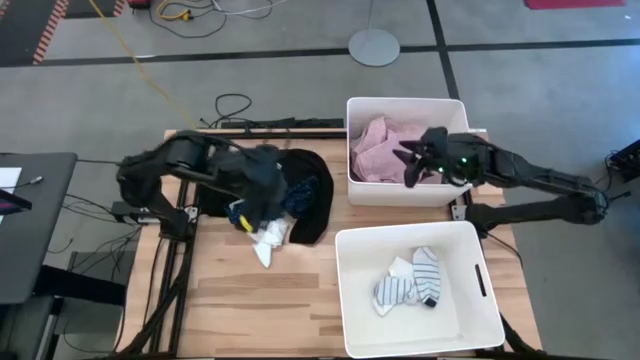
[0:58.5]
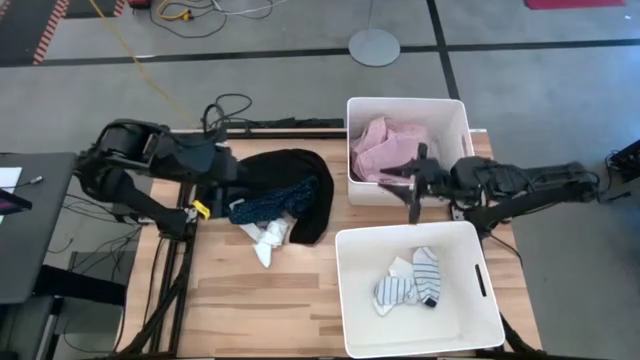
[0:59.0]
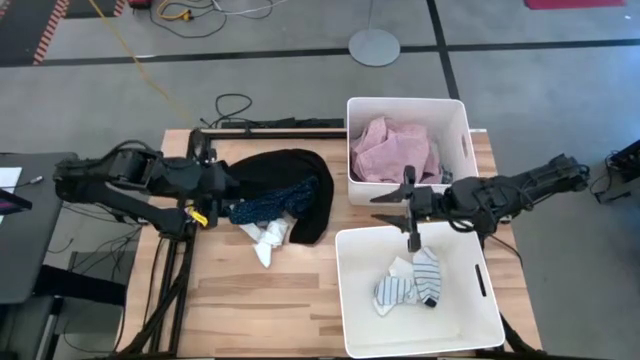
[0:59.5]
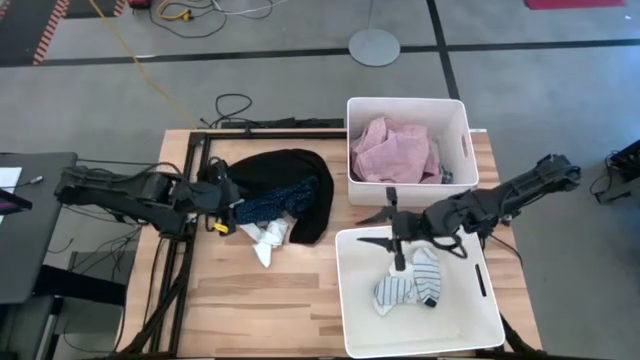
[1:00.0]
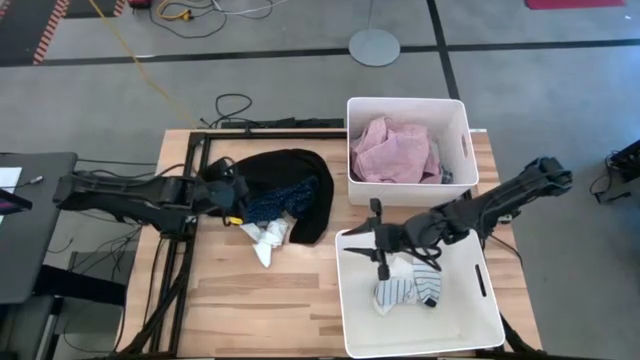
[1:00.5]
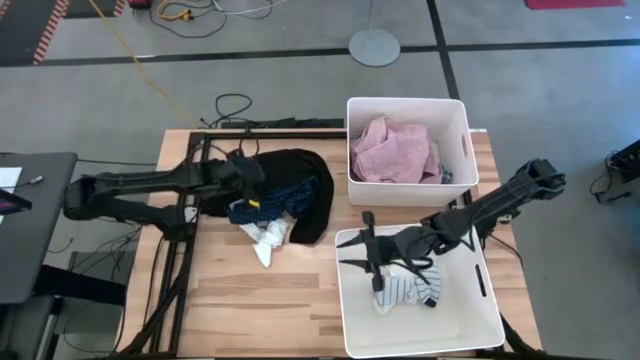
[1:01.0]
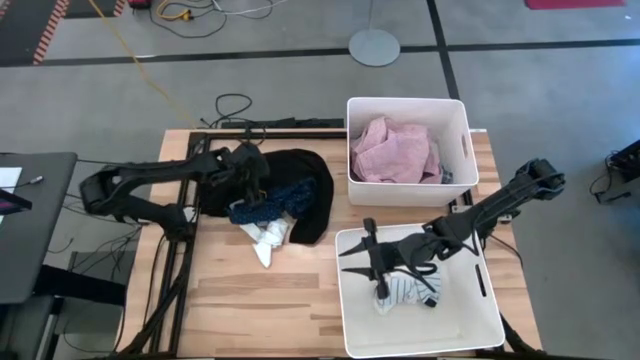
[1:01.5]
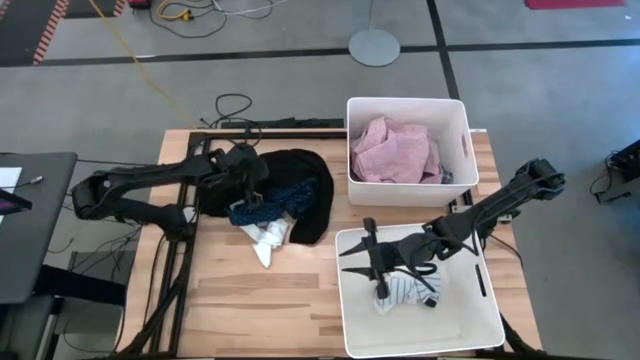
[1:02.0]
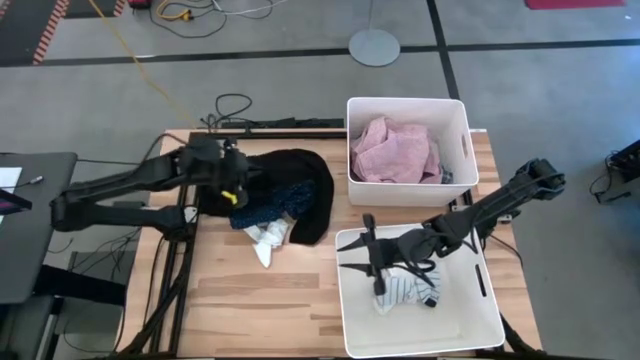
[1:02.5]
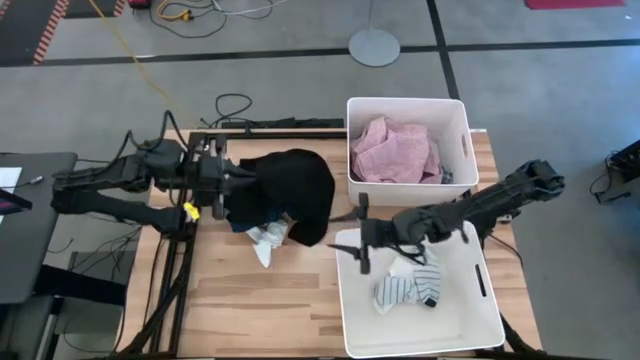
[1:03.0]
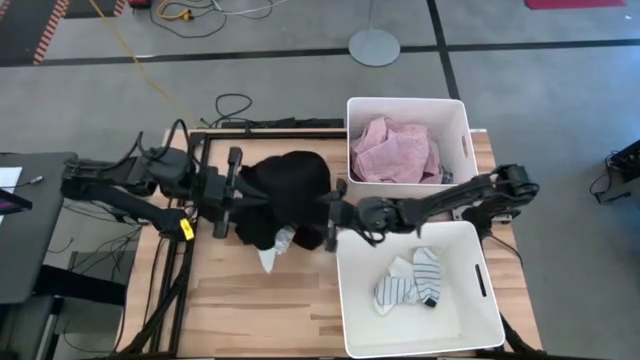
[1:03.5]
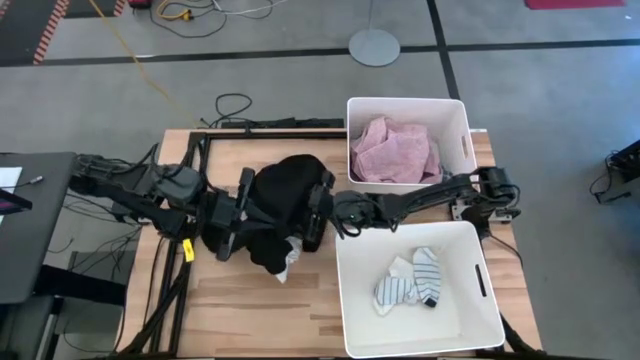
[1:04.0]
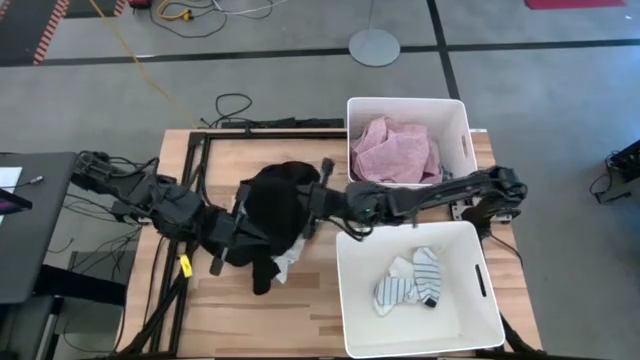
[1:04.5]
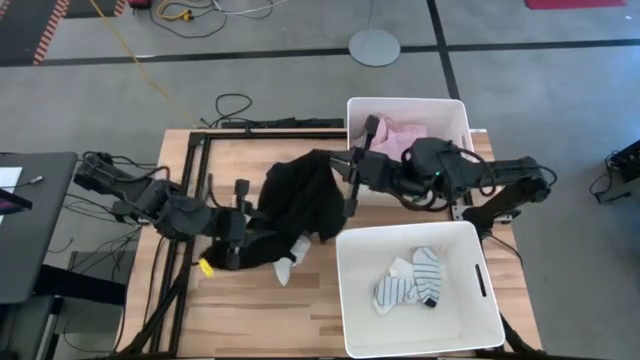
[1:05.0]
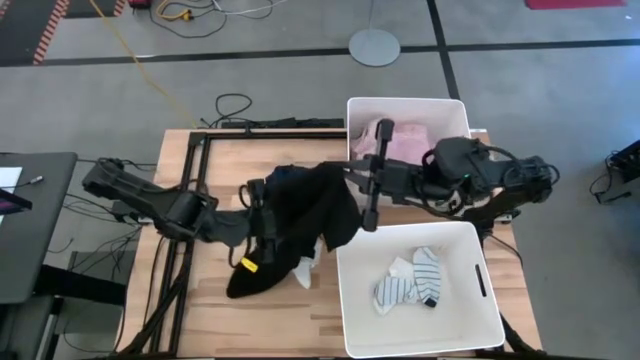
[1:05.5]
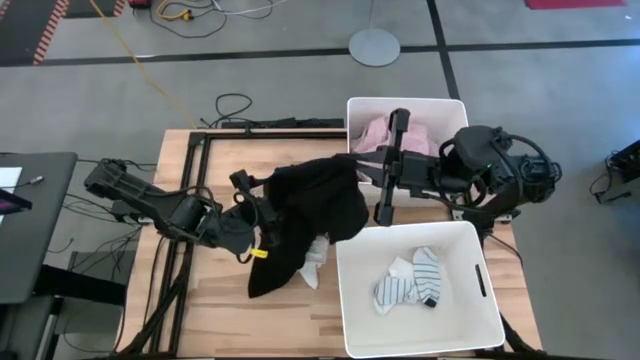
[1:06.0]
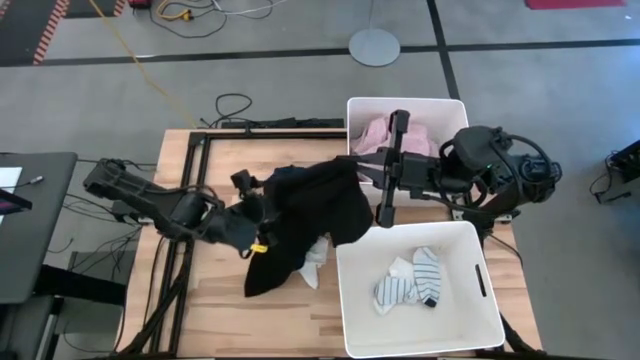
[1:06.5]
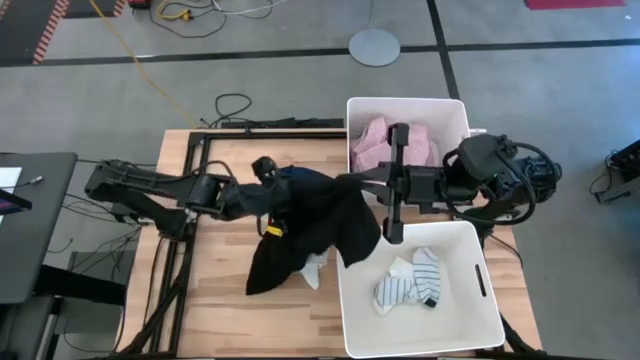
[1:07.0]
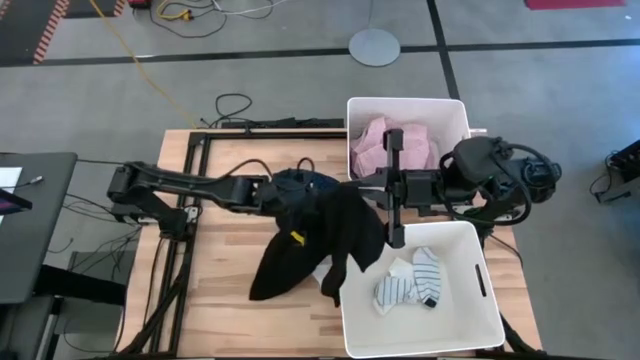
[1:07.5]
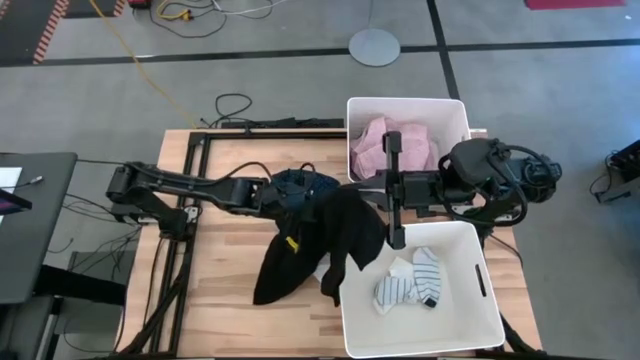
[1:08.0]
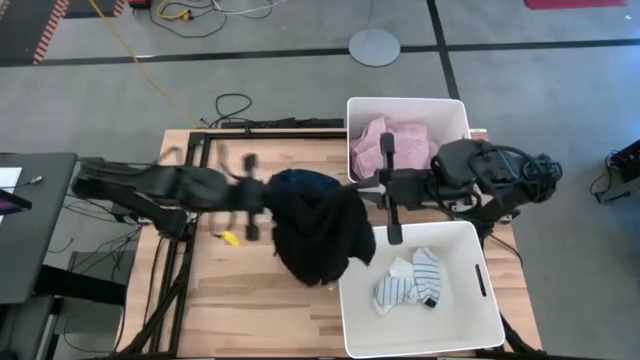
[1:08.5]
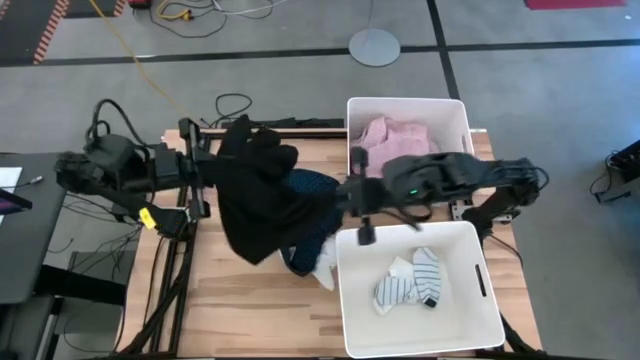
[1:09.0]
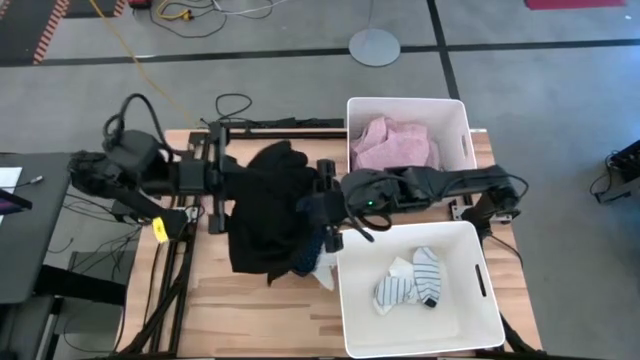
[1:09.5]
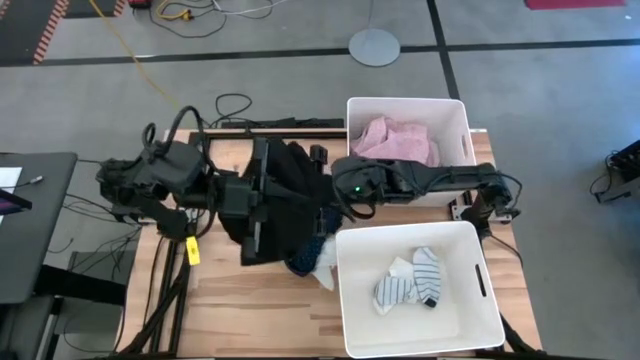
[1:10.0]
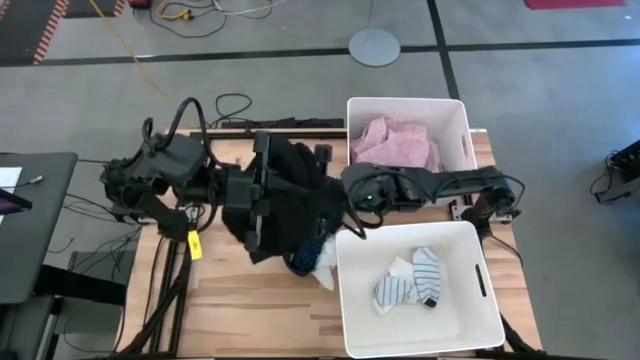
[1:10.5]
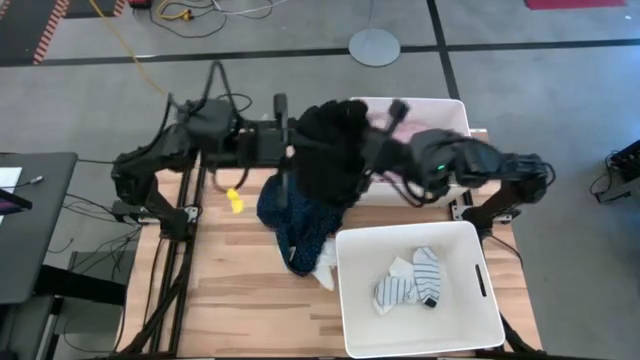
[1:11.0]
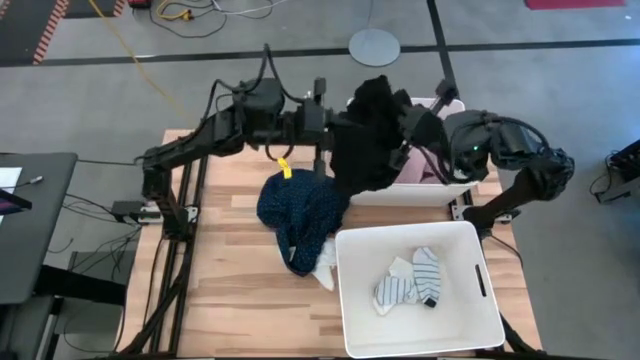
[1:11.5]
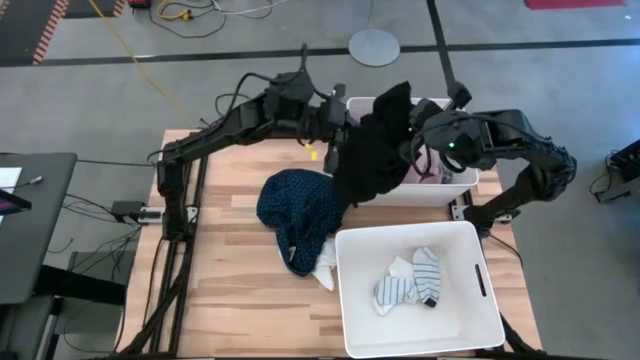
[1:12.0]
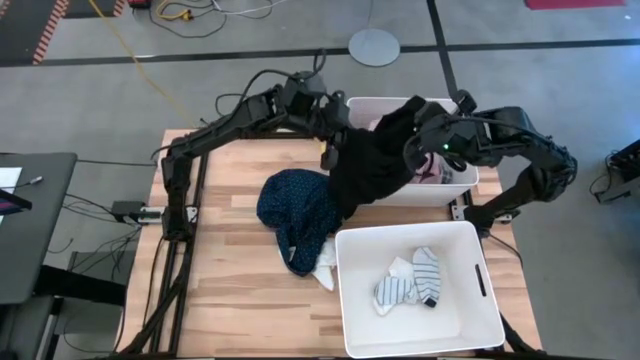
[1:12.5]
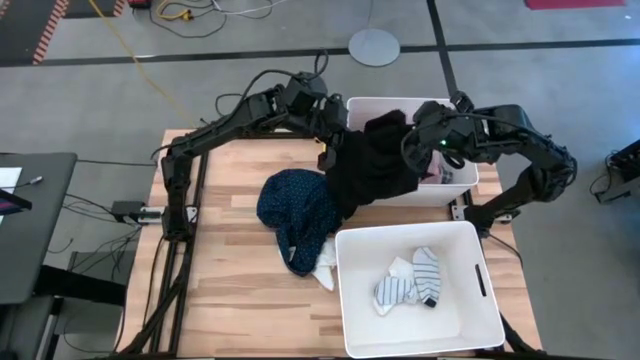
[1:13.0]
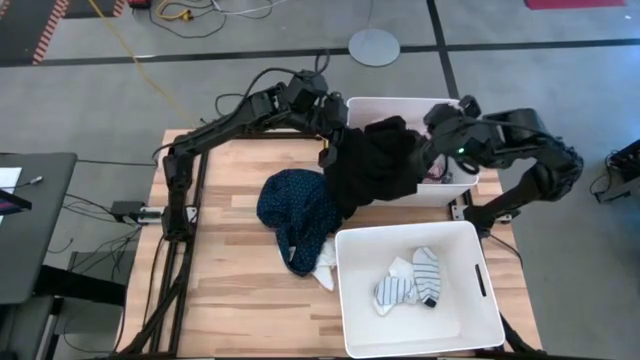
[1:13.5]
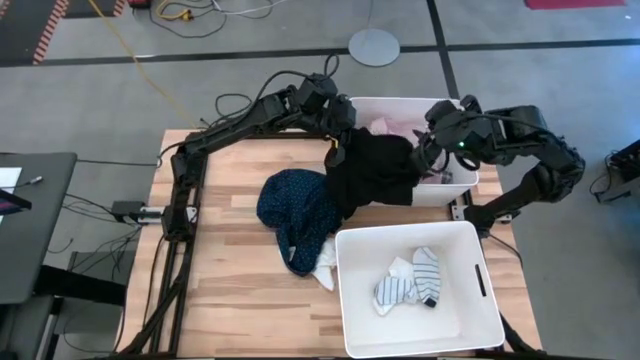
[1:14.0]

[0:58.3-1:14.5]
Task: Sort clothes
Put the black shirt into the top white laundry bin

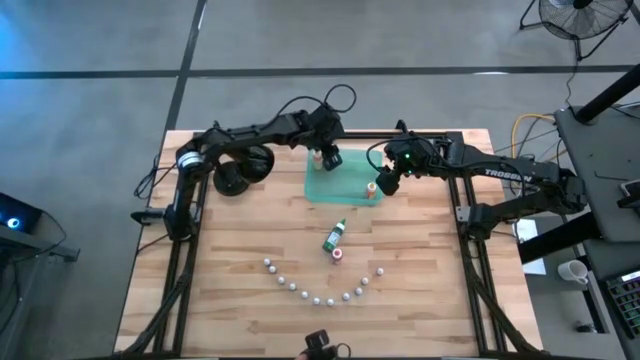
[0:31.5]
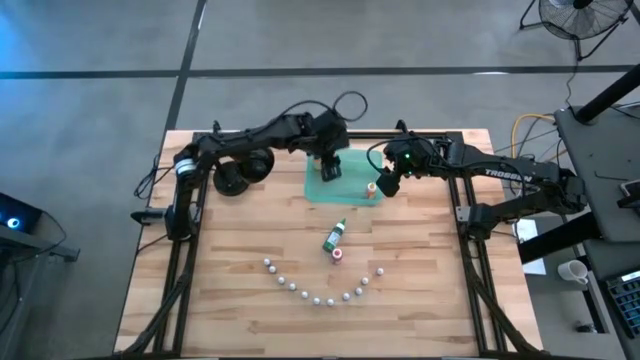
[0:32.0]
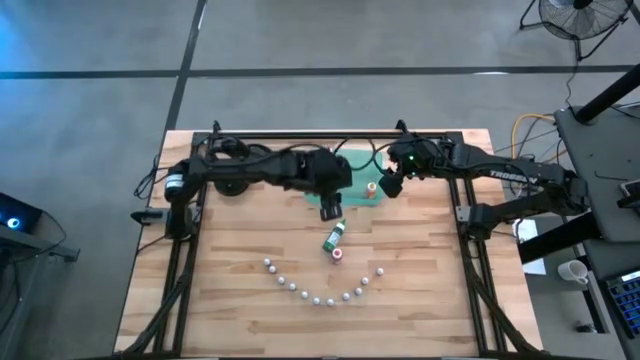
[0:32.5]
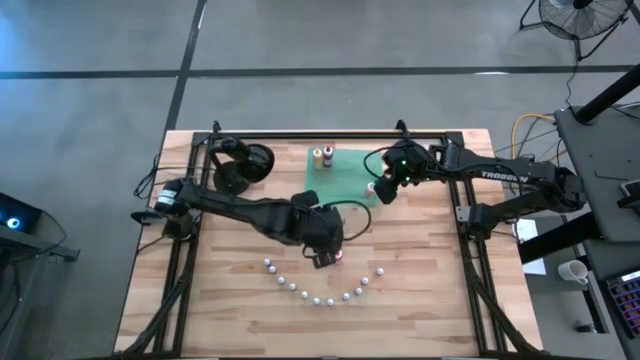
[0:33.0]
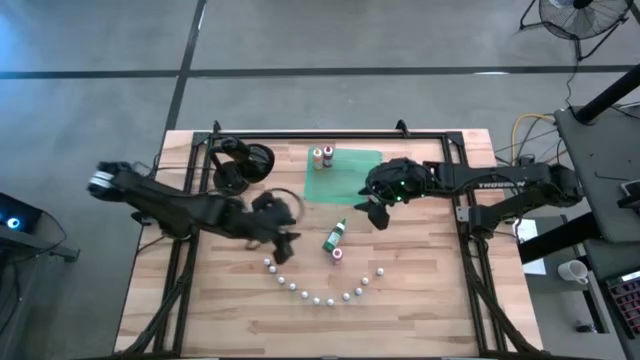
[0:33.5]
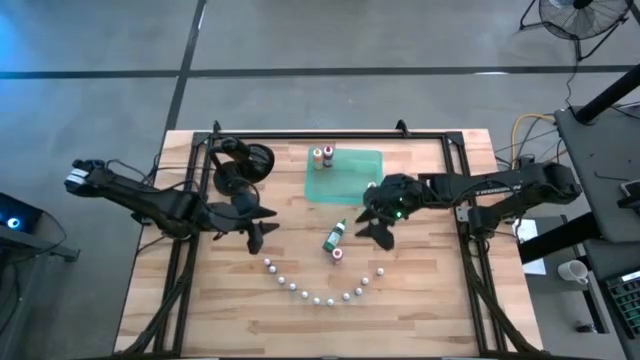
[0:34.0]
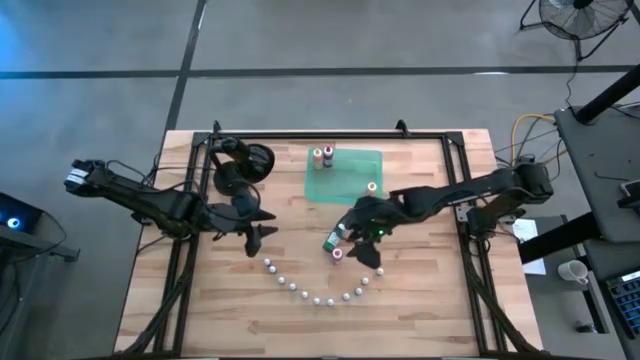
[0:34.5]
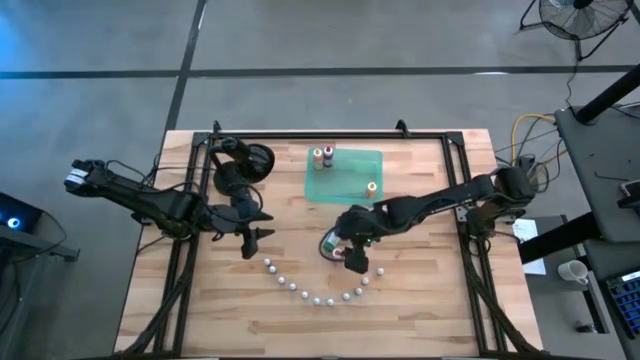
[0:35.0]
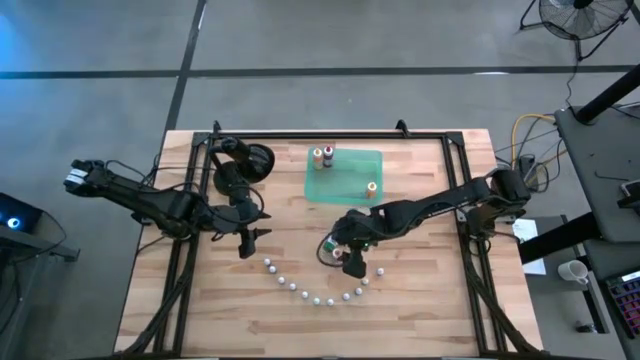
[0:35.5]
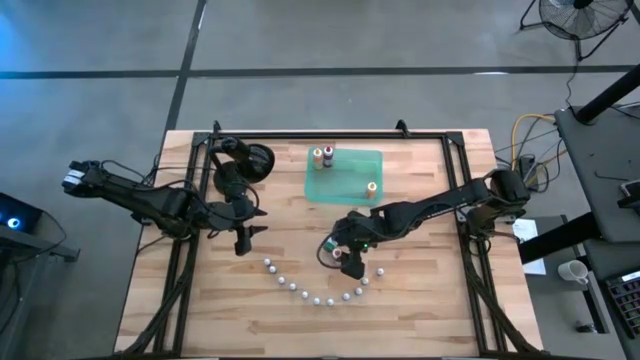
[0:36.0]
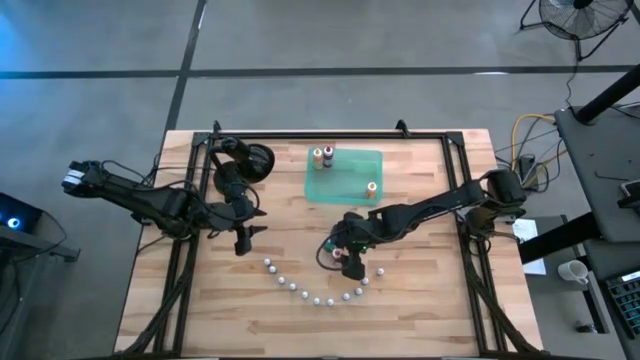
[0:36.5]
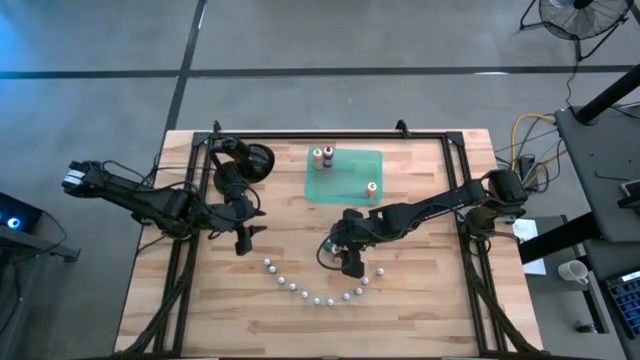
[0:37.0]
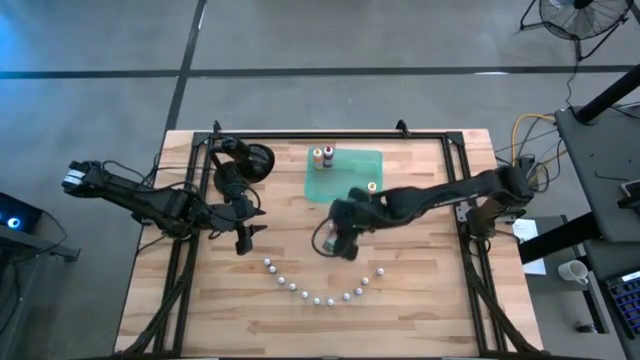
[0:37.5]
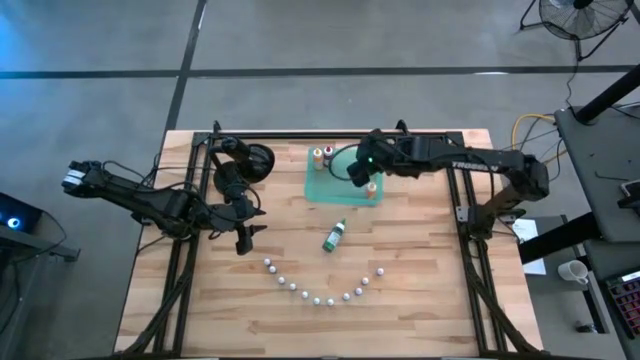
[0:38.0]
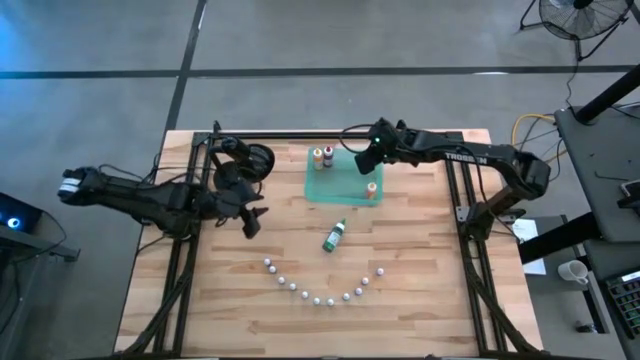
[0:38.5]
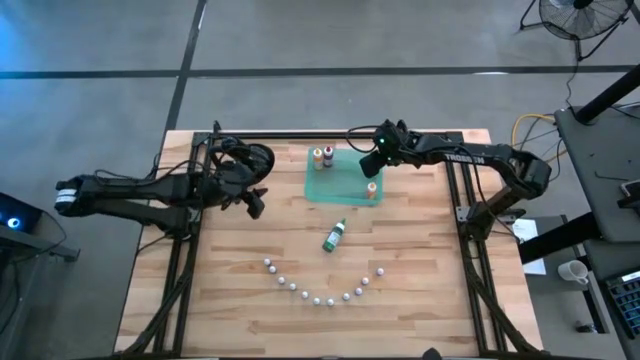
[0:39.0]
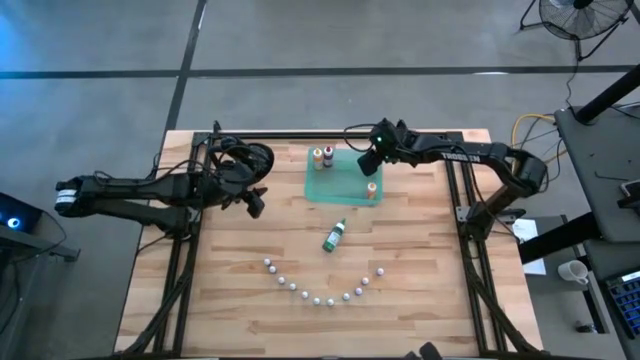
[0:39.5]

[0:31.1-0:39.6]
Task: Pick & Place food coloring
Put the large orange food coloring bottle into the green bin
